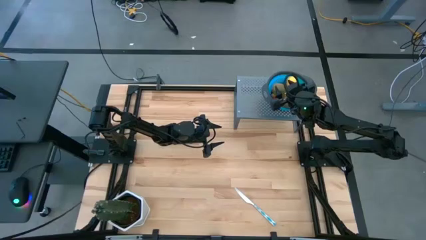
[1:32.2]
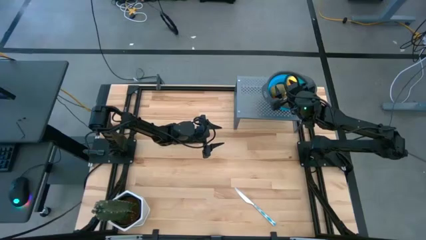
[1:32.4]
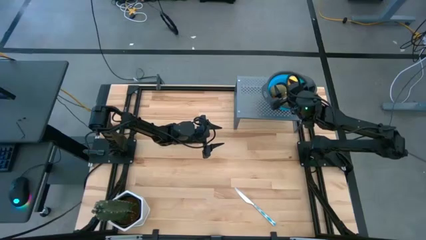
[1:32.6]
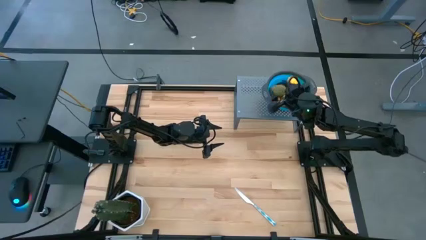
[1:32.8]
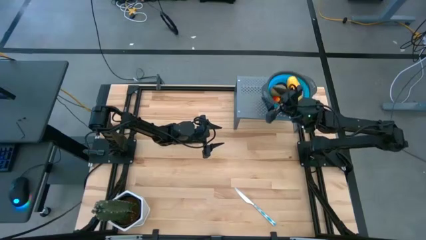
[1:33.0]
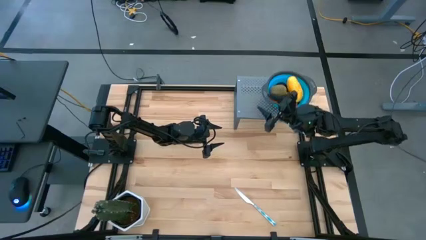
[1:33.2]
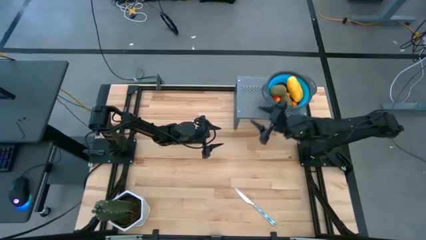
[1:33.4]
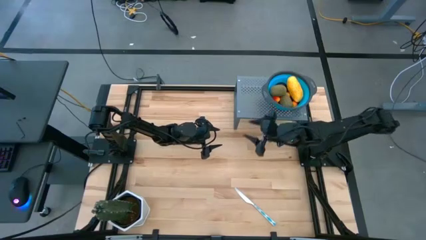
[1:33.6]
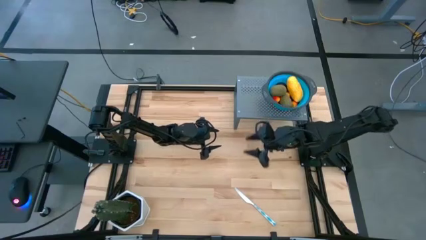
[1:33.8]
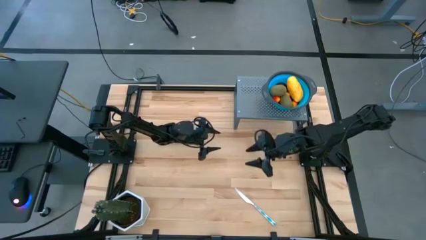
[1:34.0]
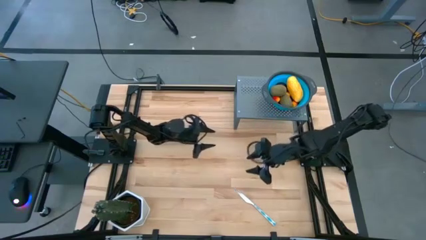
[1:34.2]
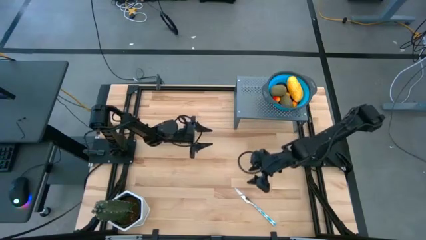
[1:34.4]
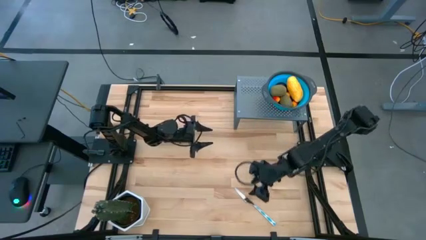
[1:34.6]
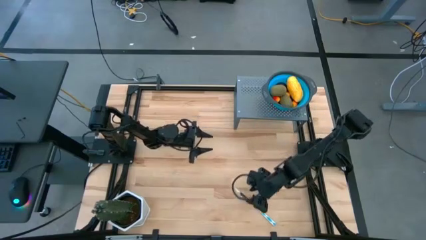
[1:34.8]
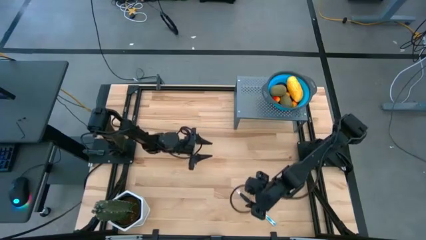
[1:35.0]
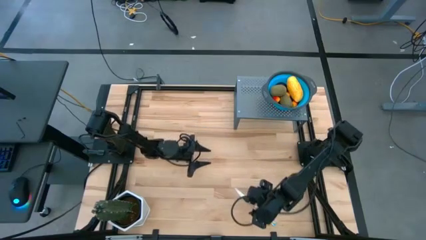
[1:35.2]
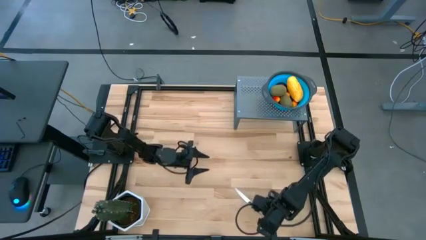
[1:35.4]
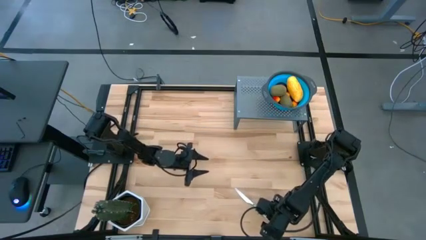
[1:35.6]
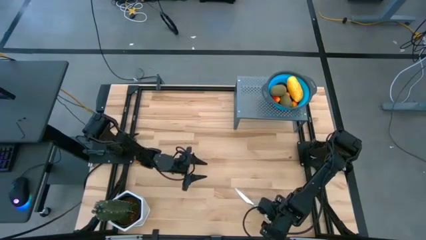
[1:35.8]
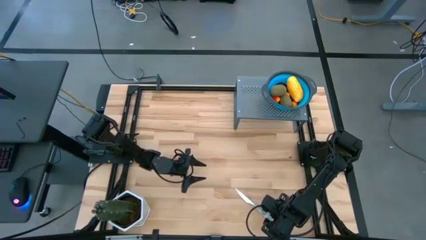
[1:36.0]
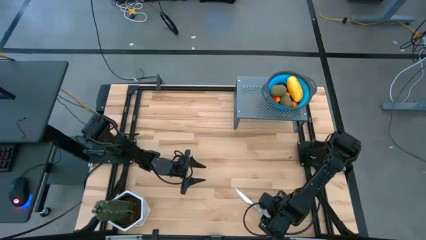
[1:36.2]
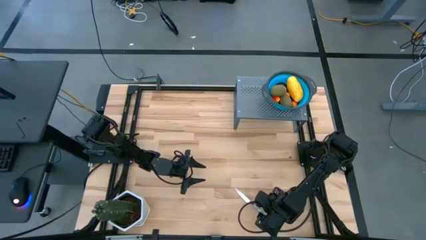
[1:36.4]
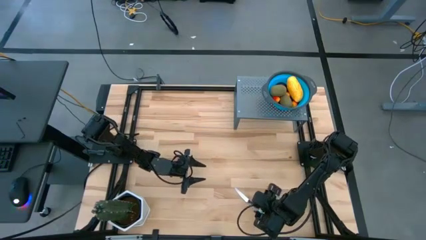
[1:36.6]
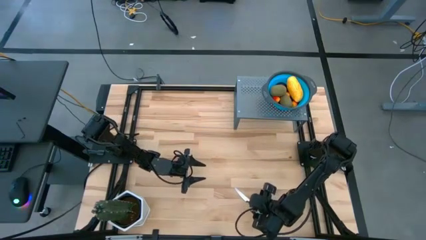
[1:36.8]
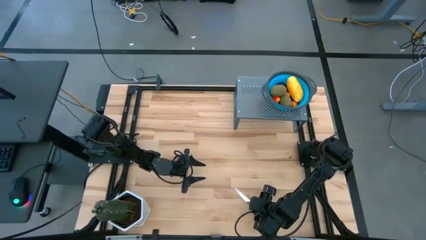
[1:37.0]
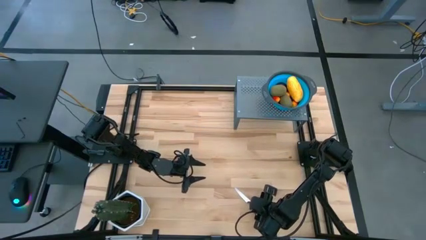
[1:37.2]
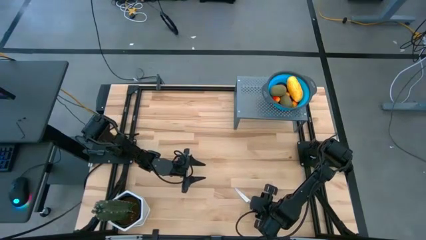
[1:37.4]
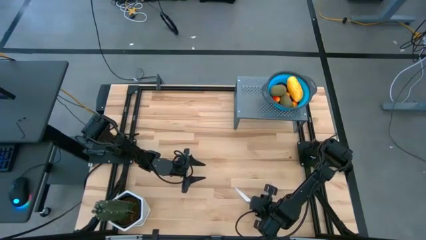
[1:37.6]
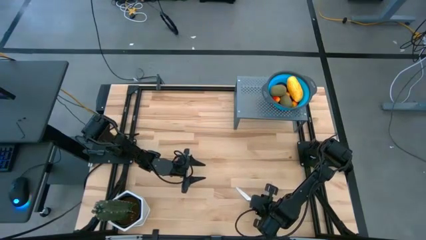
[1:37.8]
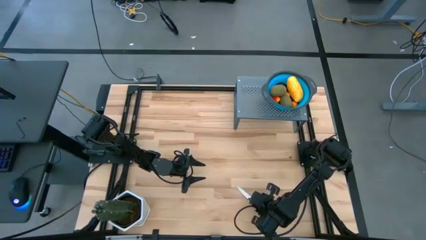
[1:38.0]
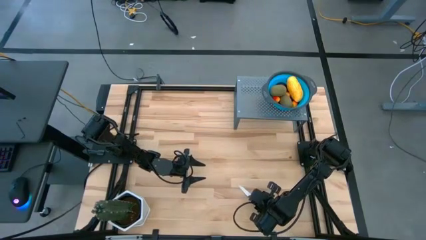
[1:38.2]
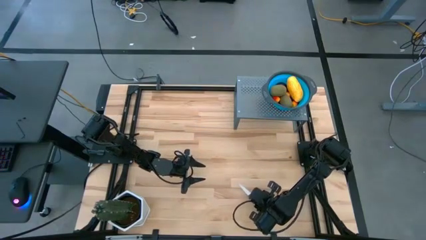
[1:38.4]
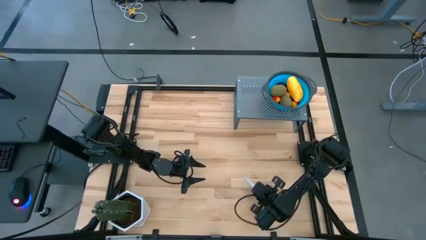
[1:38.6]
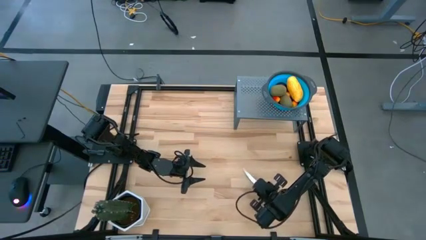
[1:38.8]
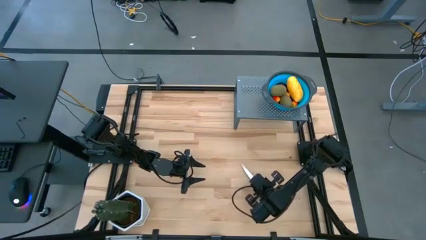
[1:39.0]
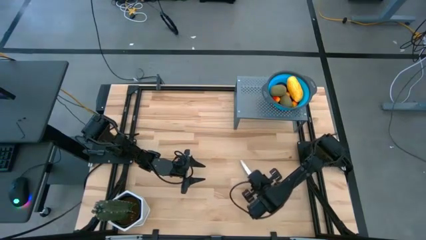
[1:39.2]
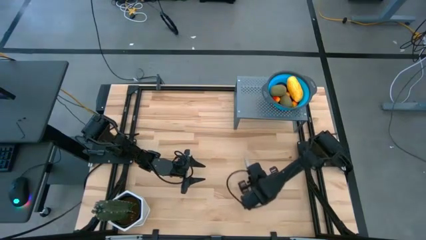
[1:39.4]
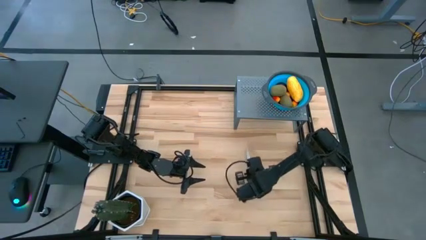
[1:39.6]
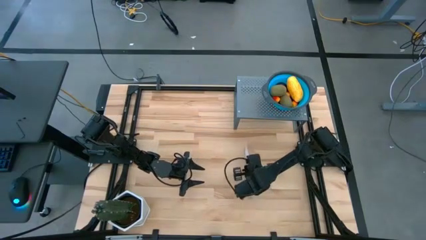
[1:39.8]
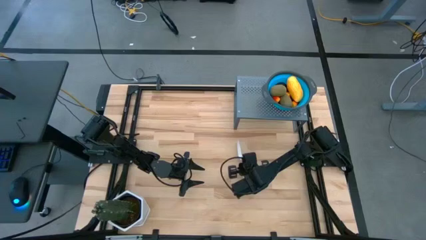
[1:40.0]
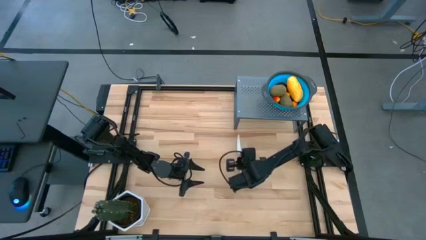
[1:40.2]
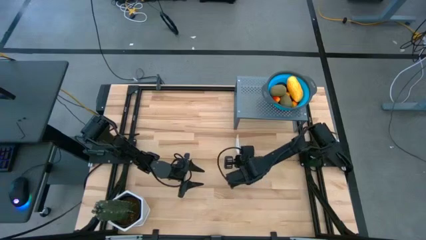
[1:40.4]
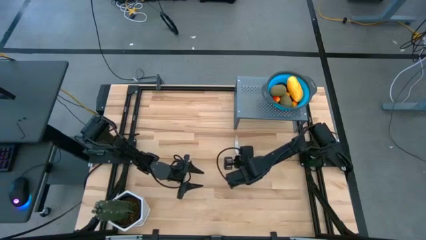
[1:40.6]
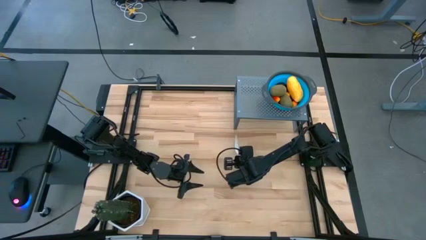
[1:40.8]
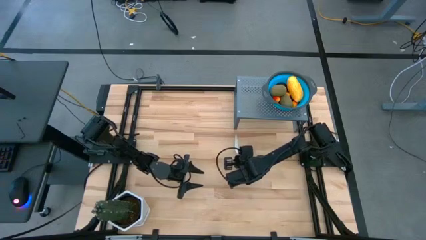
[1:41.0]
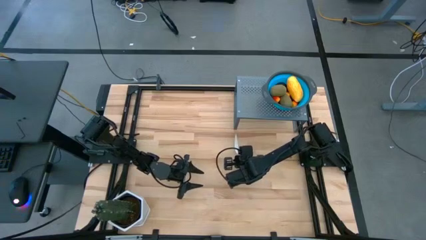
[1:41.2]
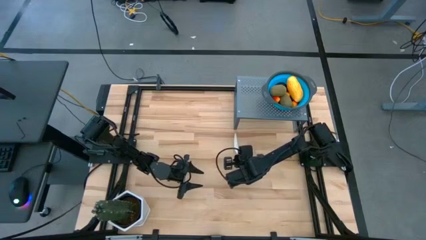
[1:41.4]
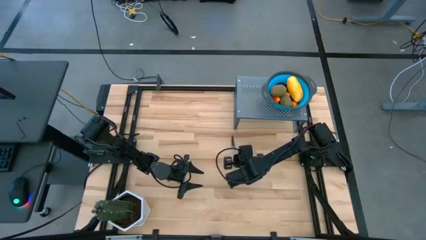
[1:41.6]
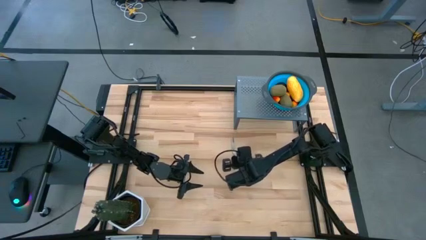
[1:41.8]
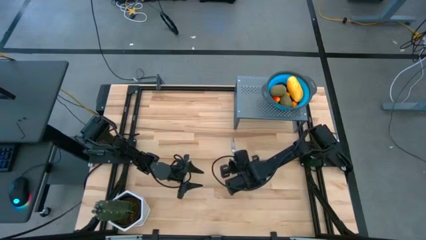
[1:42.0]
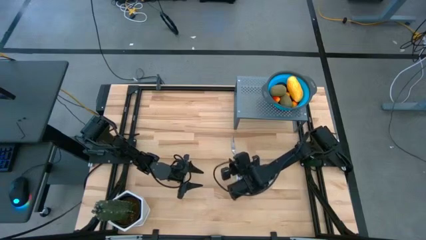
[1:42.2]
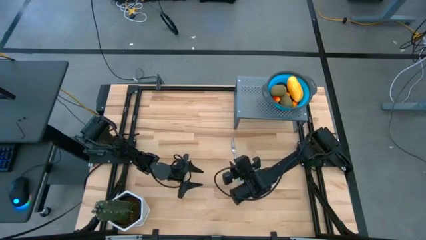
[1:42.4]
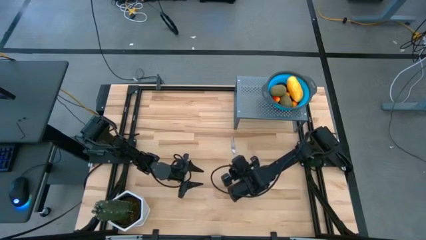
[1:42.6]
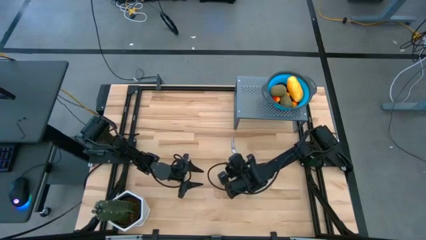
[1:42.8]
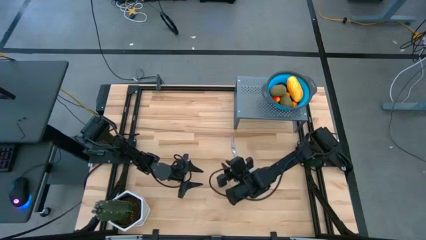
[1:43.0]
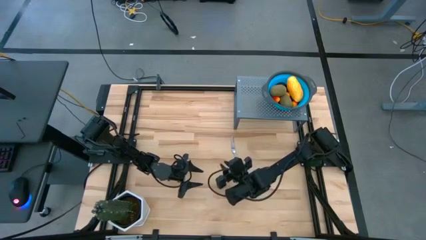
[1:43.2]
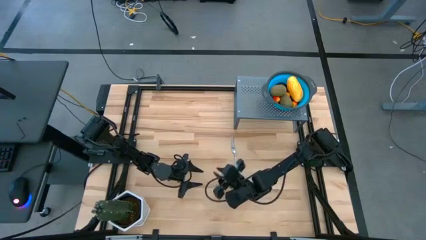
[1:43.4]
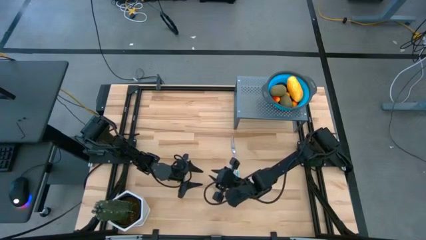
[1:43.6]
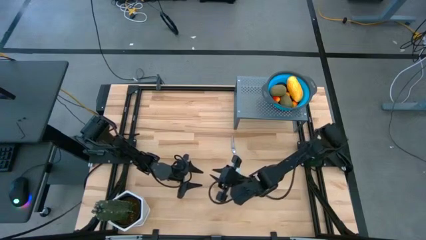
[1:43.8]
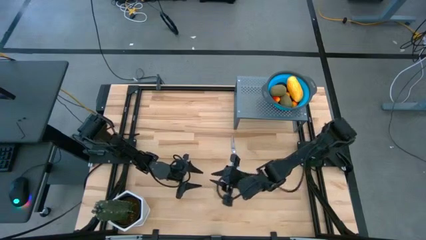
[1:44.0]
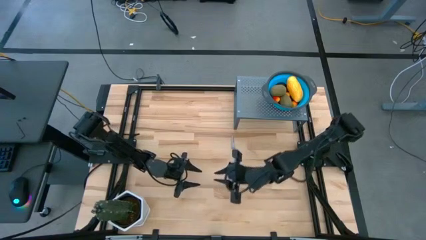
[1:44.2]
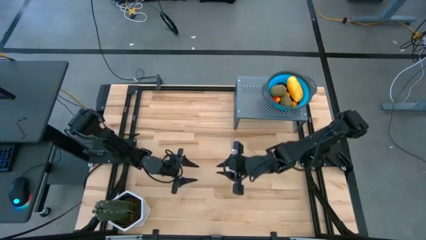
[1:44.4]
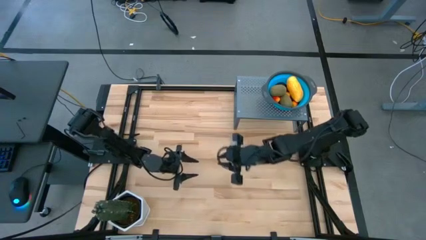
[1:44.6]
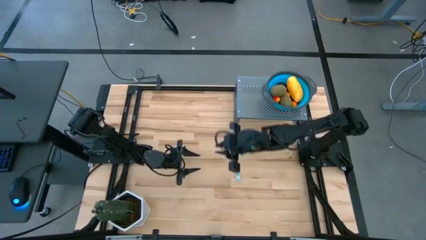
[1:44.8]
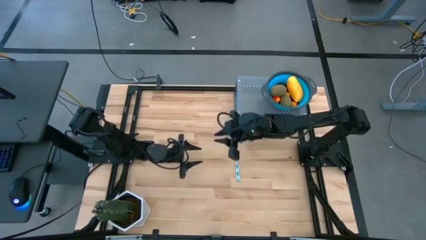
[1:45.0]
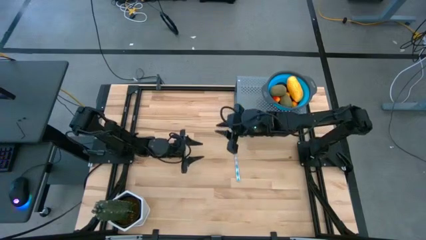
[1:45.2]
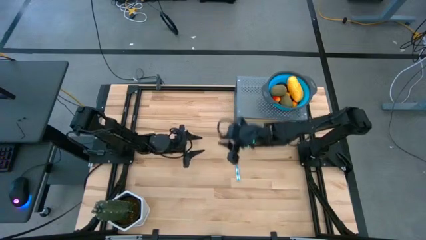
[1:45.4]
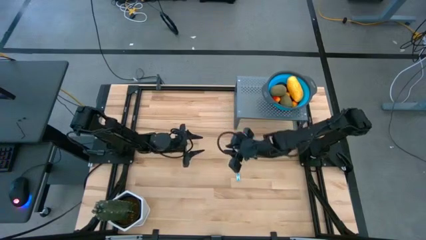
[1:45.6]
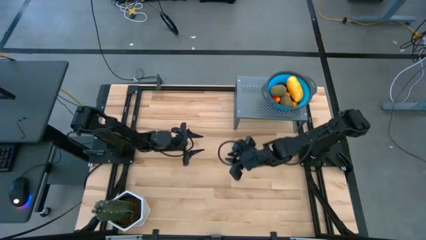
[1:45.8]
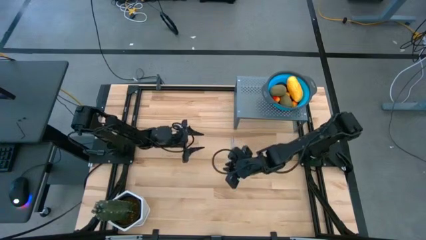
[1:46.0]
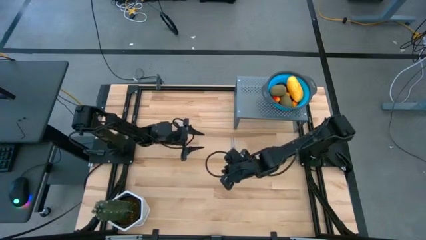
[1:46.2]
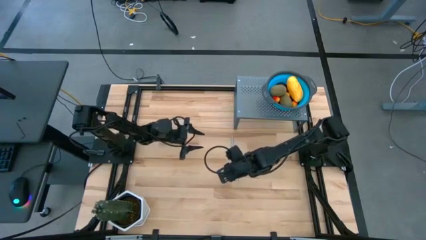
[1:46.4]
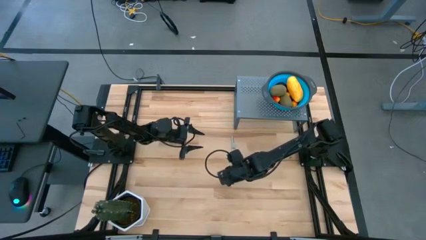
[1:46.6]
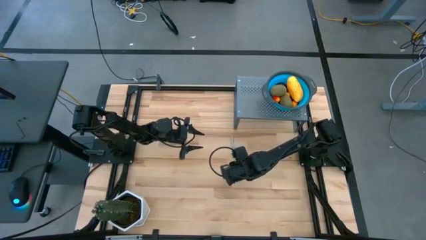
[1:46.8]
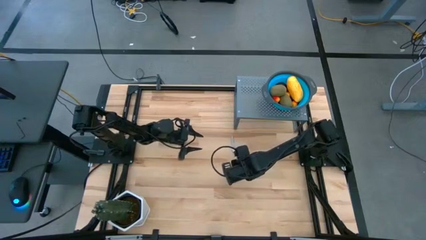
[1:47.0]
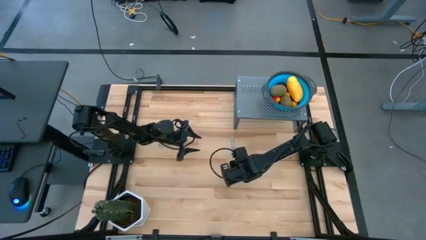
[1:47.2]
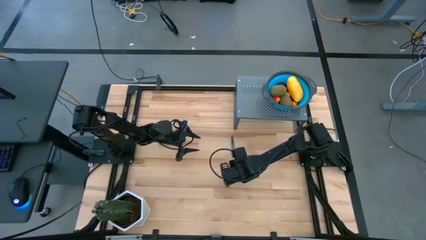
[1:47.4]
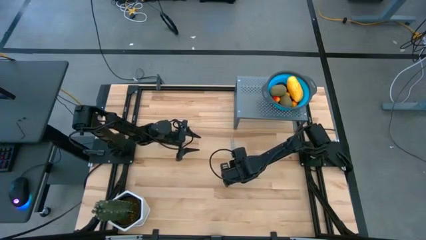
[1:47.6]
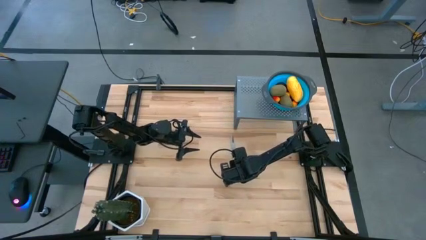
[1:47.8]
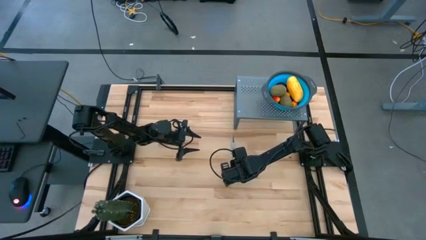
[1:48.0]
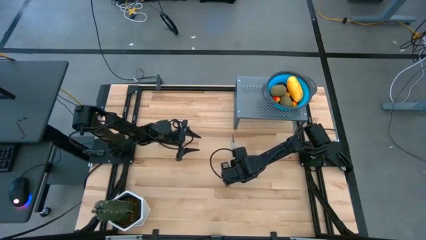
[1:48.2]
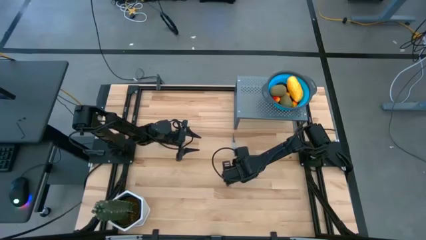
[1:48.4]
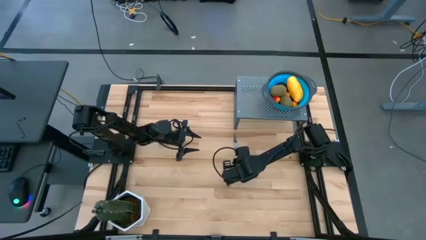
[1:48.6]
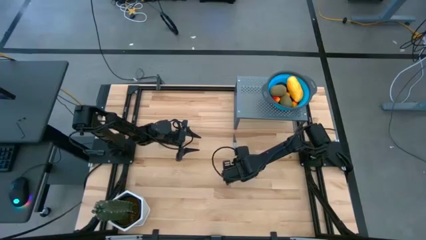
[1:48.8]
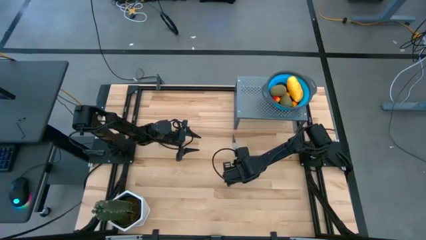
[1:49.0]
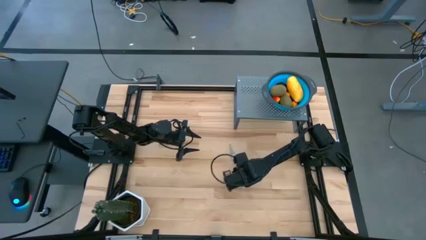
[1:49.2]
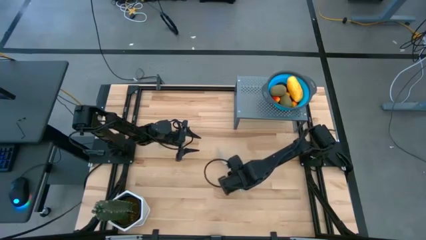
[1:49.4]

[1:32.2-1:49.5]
Task: Pick & Place Fruit
Put the blue table knife on the shelf
